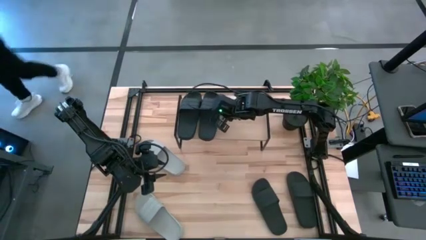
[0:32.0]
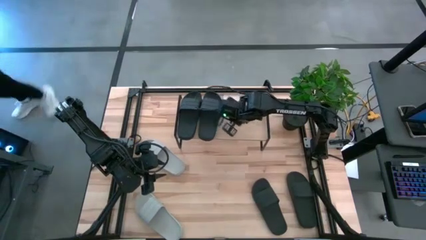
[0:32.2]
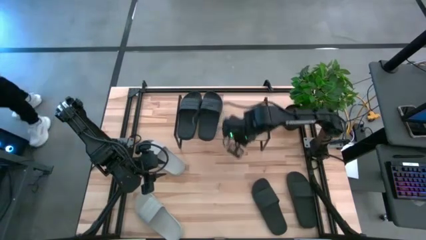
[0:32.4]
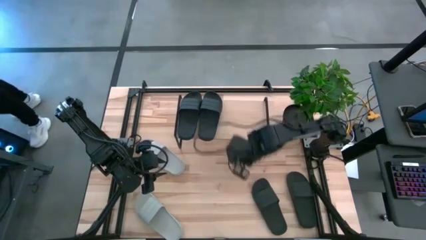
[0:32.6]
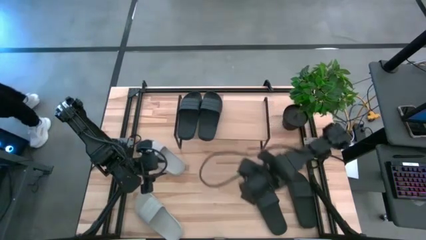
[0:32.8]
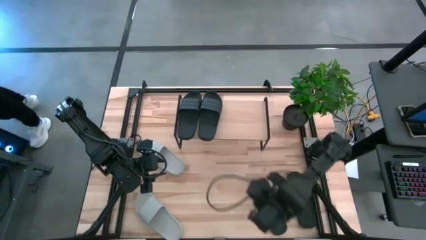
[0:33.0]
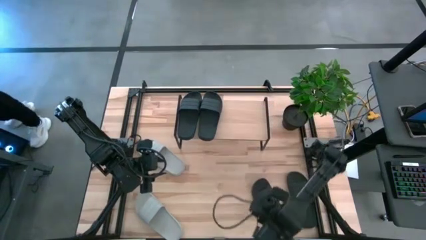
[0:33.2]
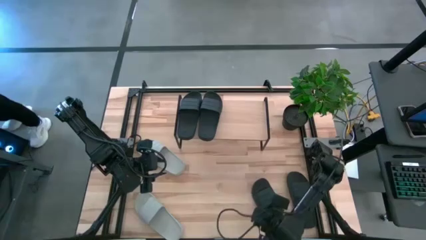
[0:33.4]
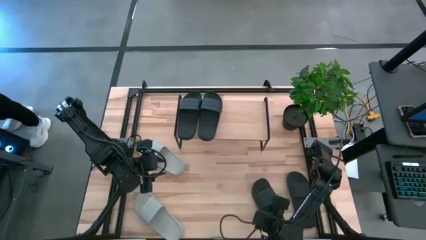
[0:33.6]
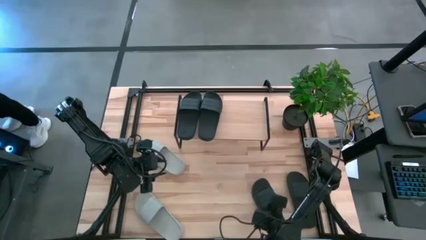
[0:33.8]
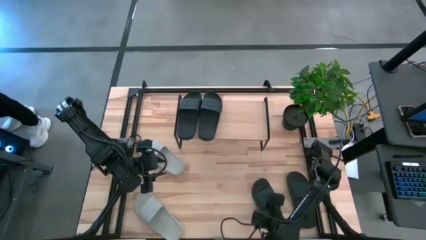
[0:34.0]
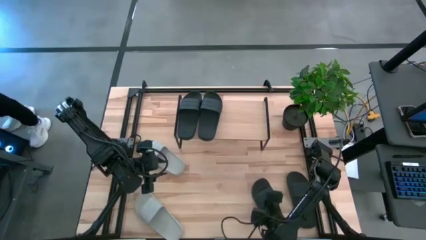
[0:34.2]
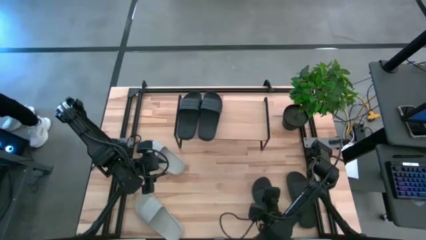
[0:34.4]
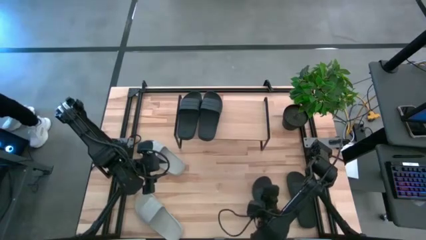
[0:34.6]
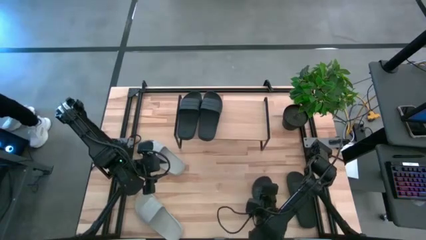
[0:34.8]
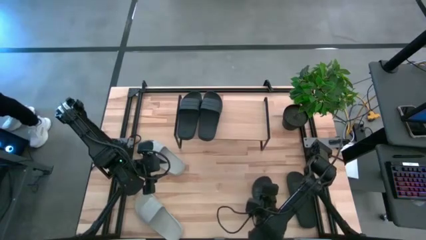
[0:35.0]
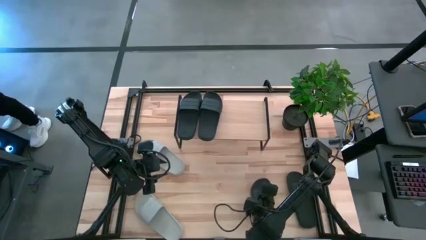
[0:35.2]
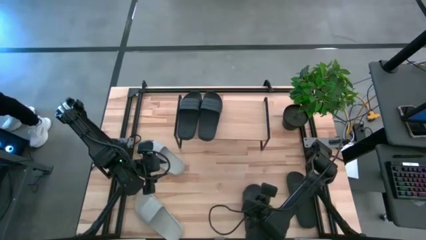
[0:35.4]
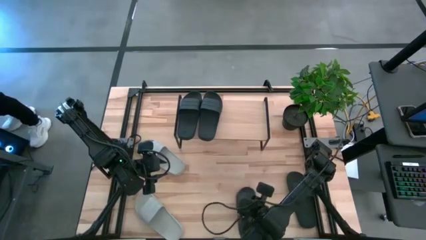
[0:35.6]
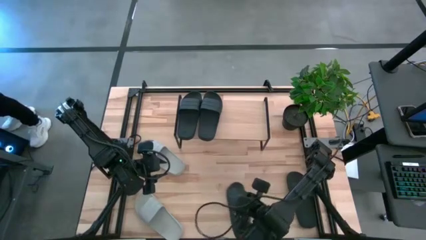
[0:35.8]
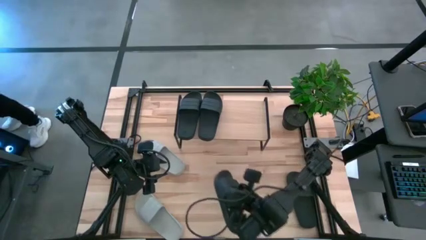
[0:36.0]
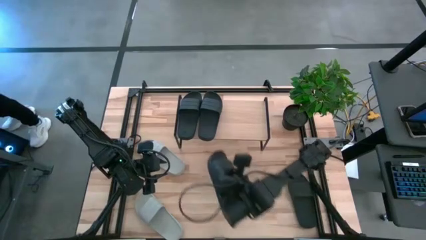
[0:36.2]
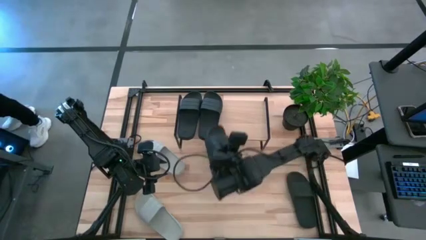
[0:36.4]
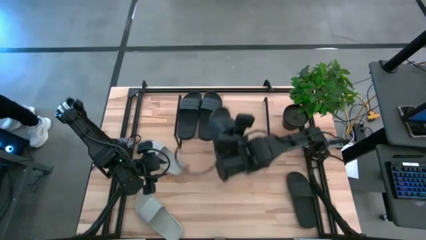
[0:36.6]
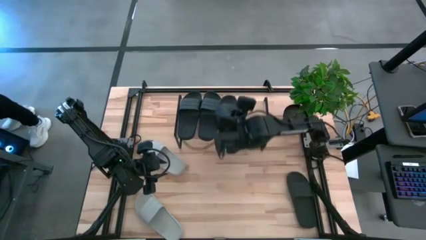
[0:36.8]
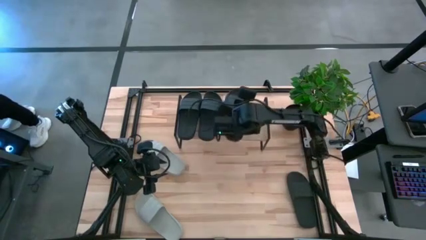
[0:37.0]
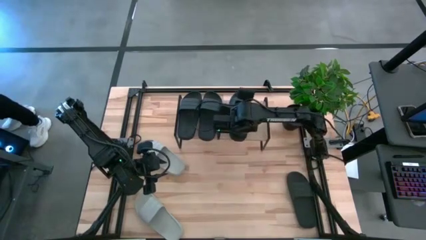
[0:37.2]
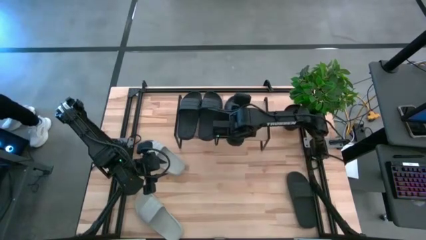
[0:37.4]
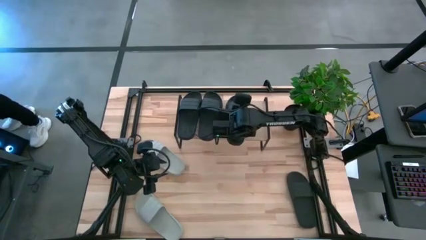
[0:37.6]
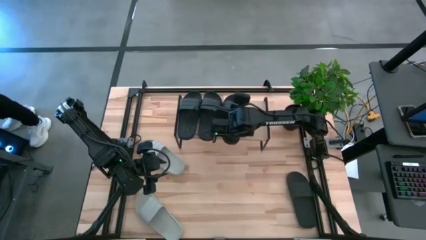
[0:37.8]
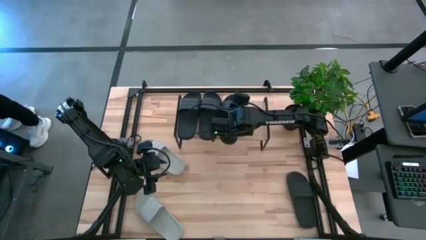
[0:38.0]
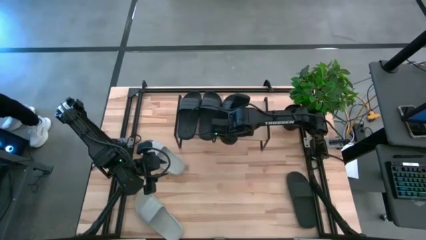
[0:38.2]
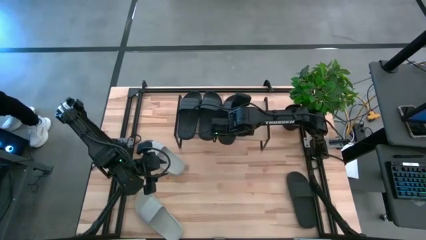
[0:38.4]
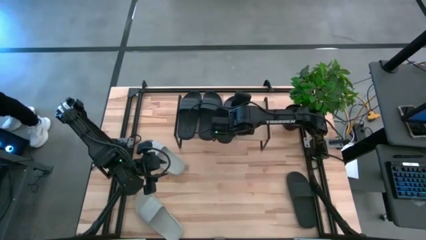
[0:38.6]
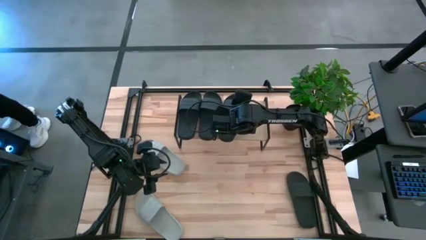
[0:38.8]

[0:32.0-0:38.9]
Task: Pick and place slides into the shelf
Put the black slipper on the shelf

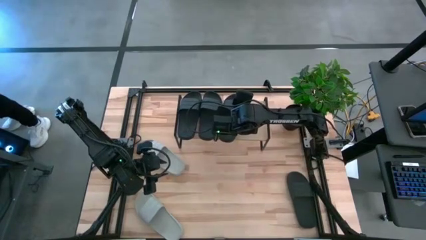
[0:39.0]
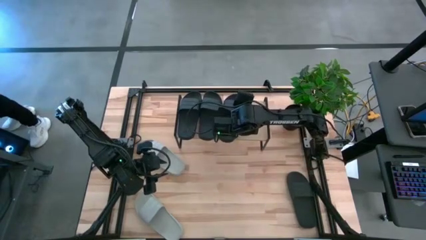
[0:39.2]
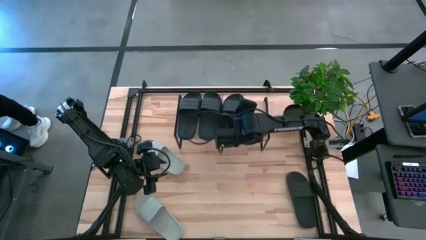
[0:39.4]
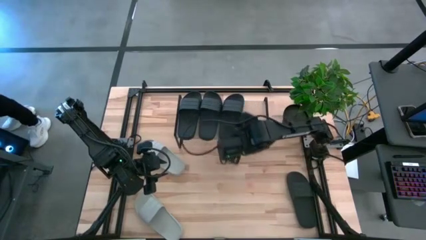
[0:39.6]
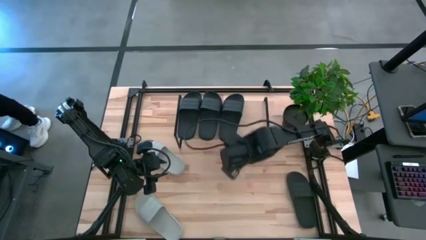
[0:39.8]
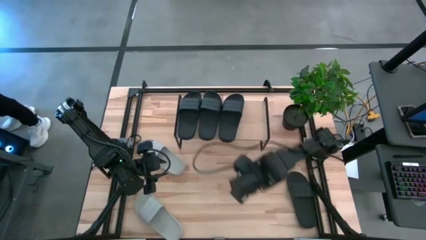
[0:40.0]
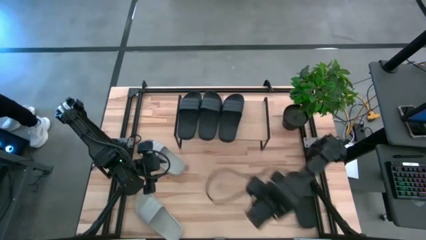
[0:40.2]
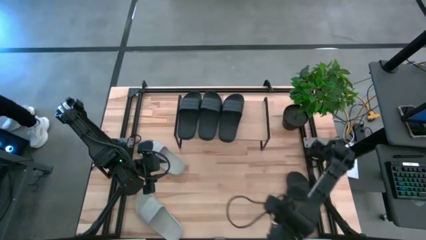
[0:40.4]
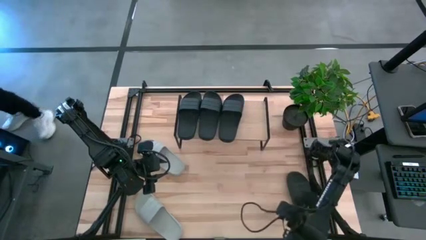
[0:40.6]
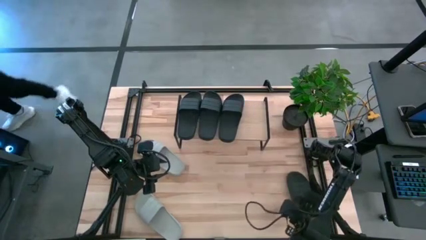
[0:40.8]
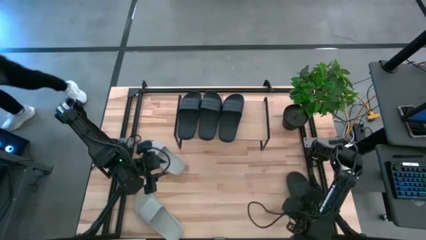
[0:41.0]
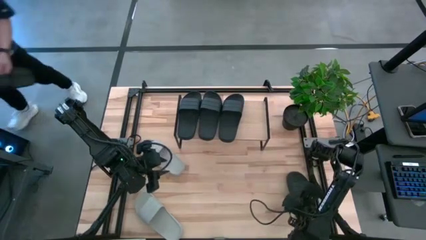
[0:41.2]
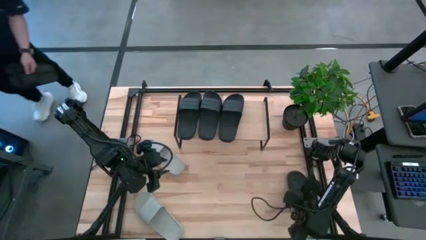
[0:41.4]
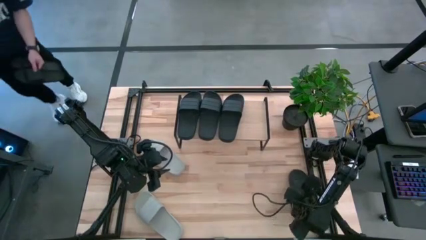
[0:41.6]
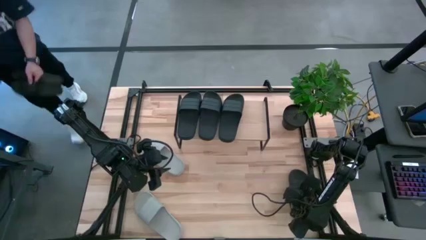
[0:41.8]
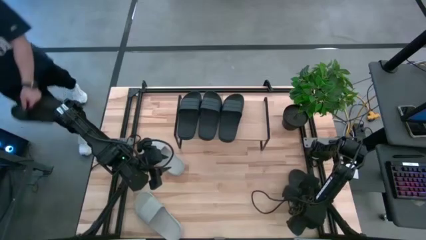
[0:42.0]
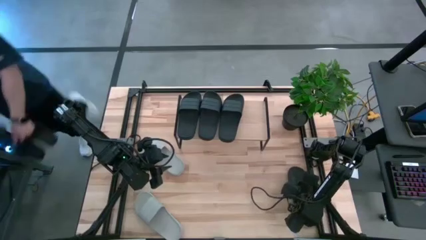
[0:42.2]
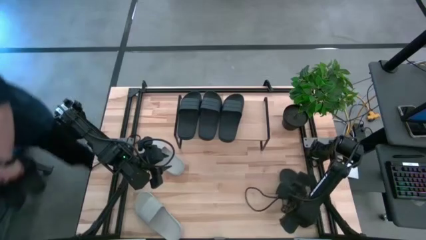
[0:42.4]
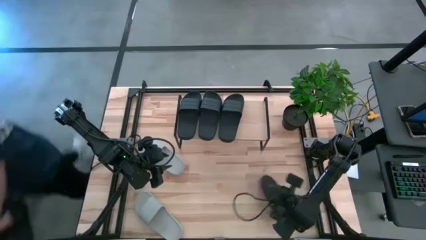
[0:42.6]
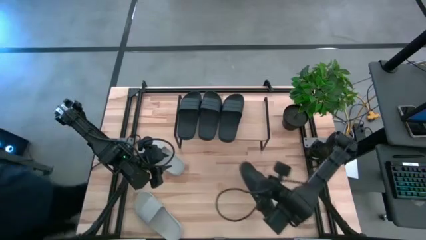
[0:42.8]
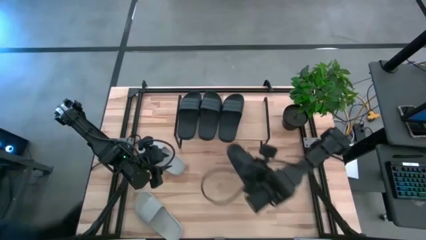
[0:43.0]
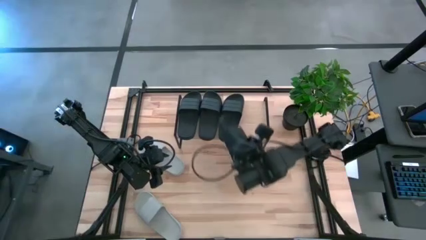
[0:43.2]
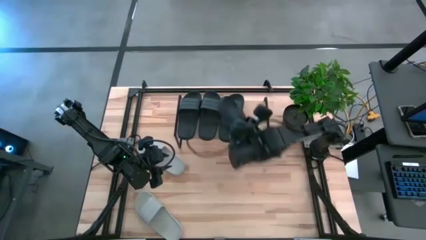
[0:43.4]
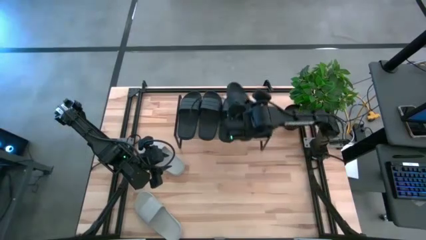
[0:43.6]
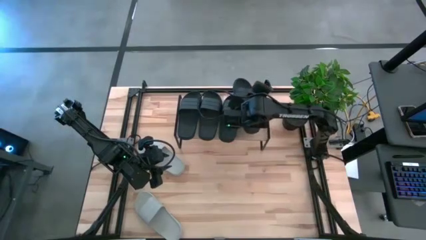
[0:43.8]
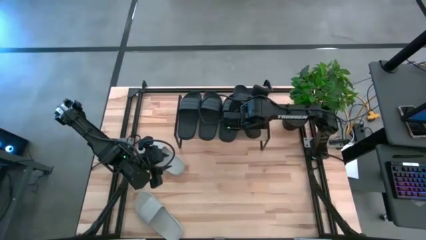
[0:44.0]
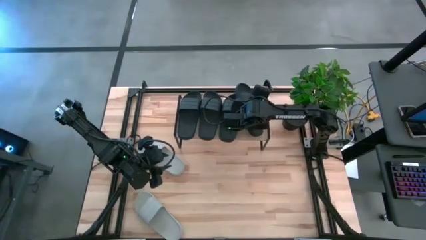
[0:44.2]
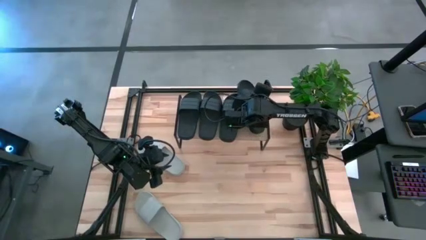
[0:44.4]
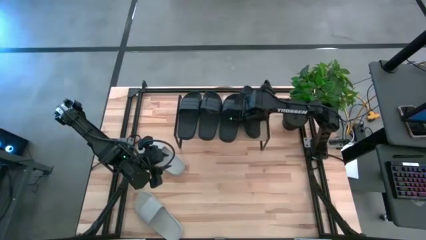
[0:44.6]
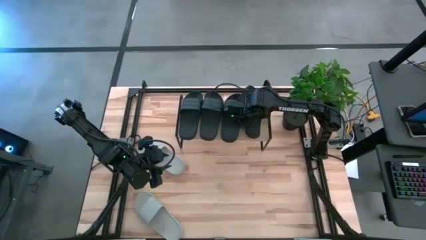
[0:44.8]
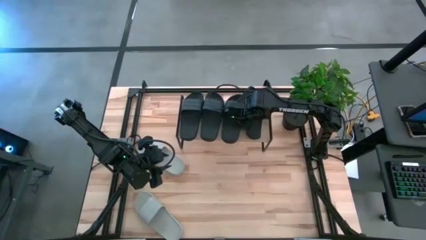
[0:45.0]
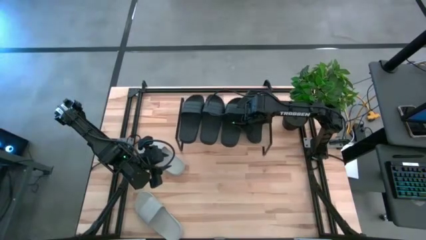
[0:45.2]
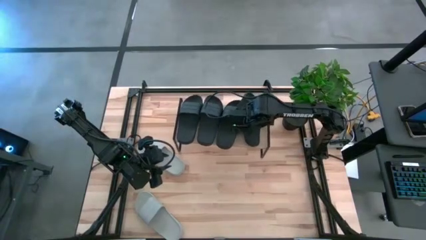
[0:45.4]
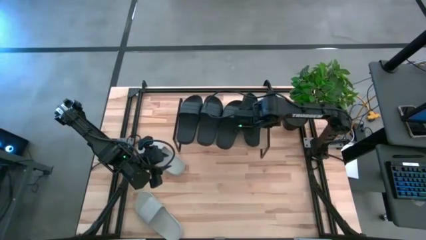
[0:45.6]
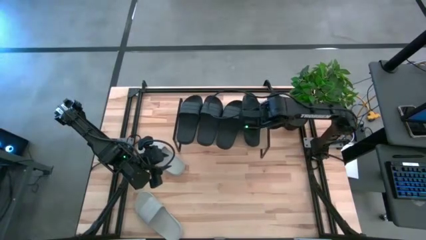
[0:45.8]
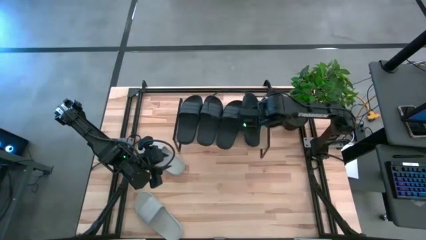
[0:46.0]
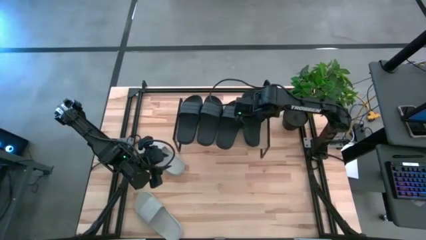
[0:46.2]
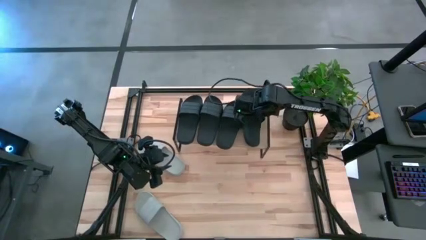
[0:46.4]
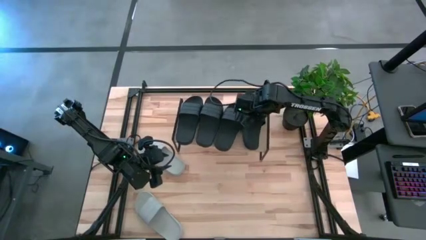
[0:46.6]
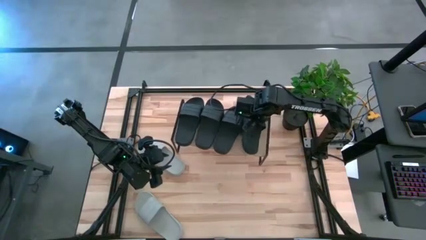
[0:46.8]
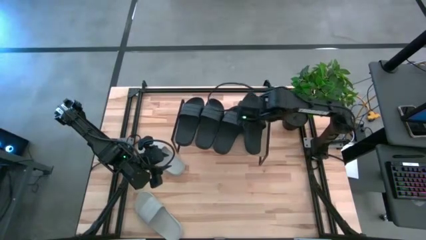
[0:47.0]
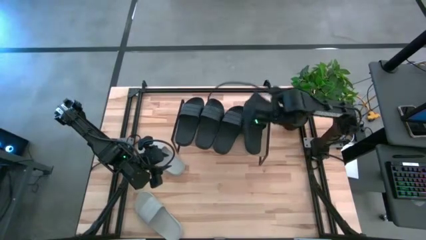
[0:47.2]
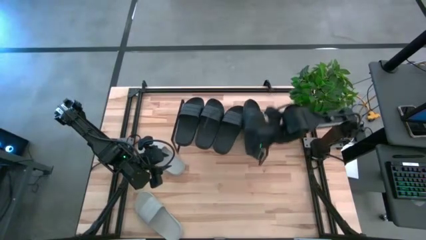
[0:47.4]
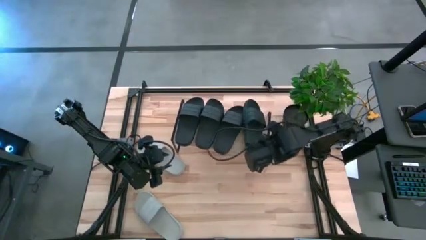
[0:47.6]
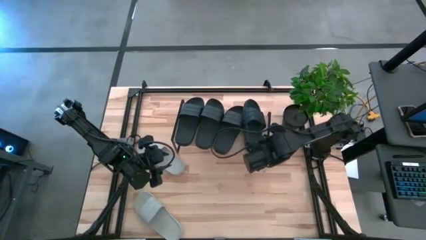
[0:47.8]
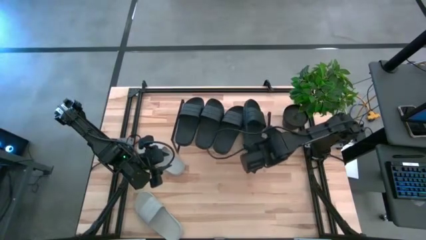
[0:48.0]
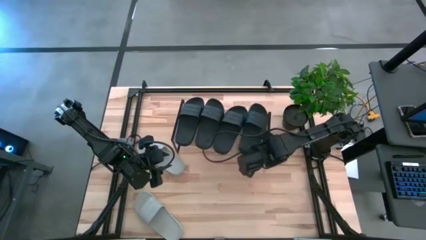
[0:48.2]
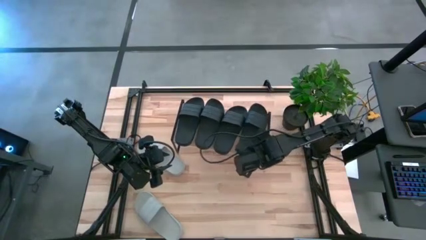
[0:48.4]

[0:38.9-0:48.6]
Put the black slipper on the shelf

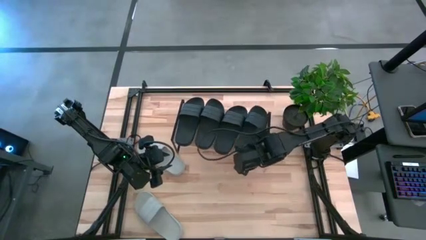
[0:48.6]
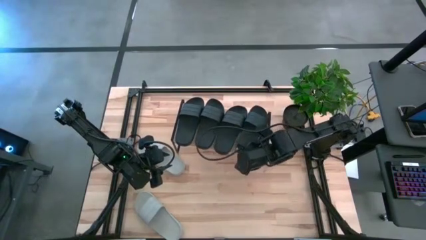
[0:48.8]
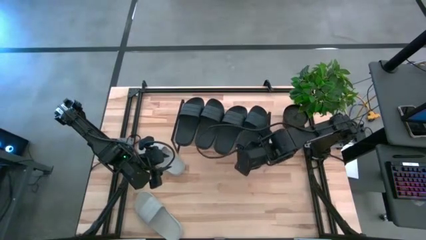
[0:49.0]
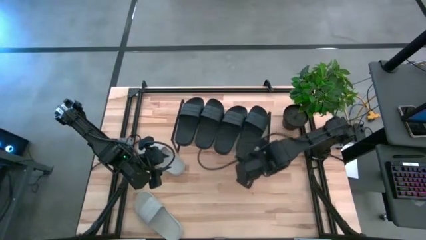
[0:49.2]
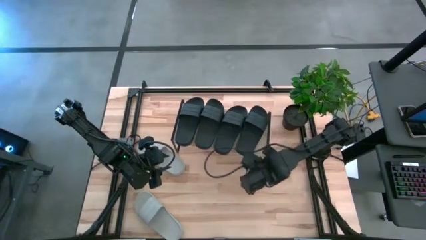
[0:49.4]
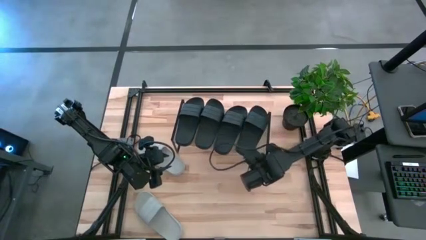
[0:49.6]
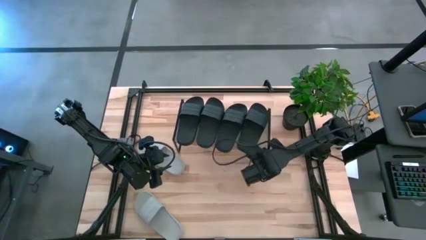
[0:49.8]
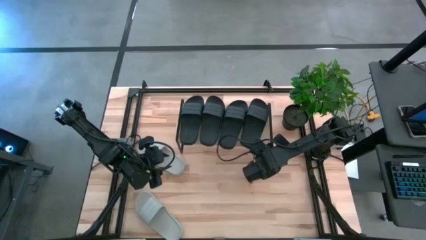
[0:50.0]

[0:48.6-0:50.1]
Adjust the shelf
